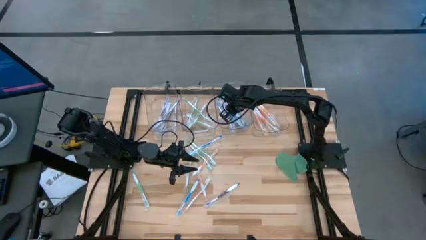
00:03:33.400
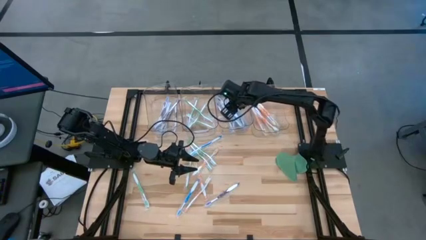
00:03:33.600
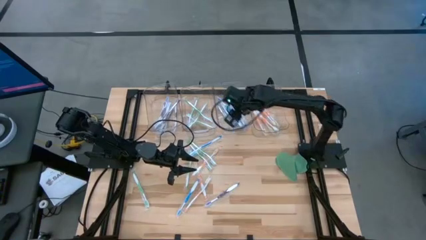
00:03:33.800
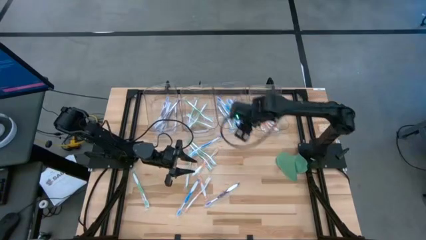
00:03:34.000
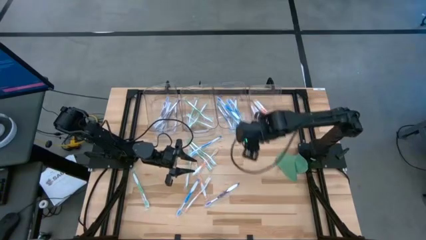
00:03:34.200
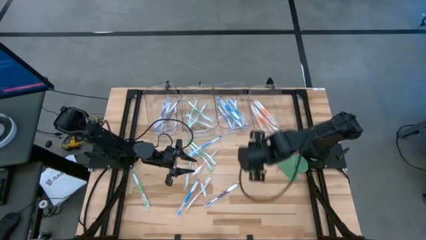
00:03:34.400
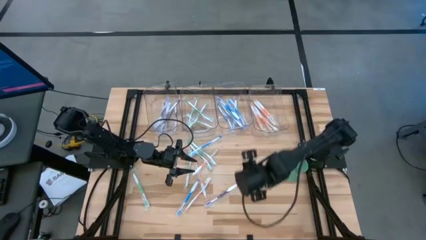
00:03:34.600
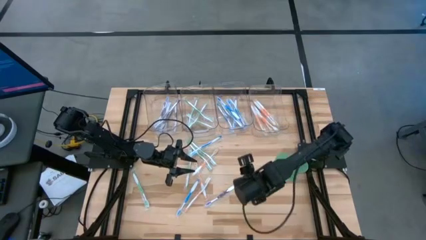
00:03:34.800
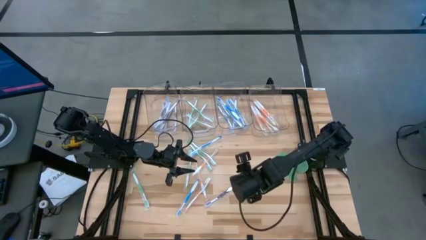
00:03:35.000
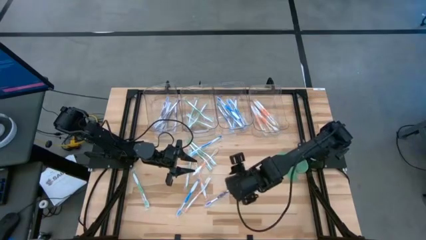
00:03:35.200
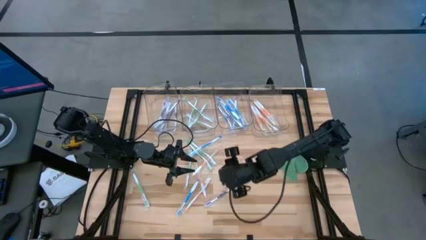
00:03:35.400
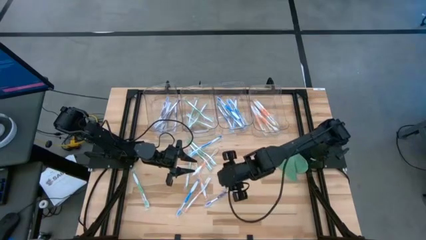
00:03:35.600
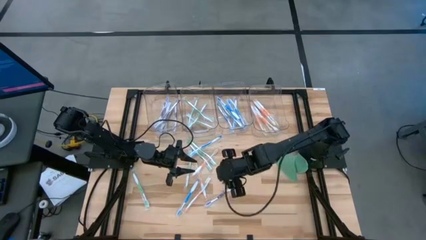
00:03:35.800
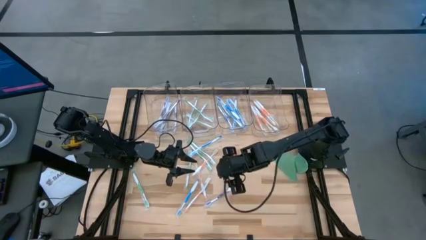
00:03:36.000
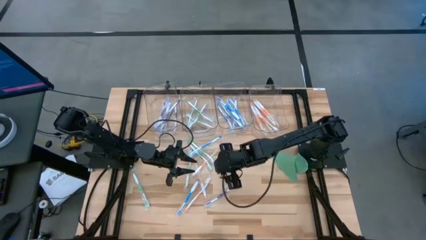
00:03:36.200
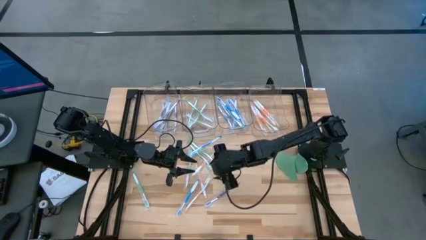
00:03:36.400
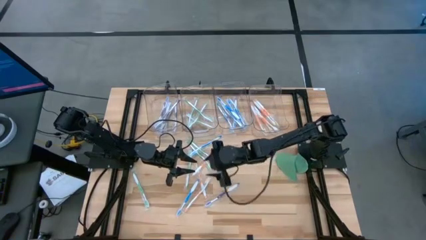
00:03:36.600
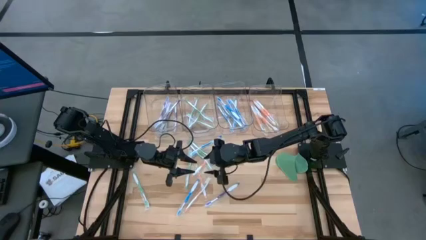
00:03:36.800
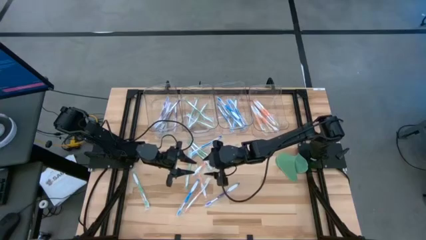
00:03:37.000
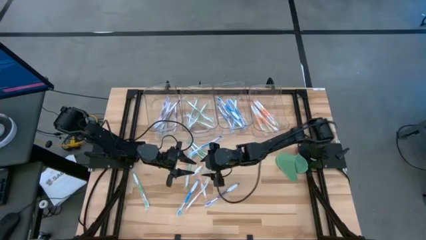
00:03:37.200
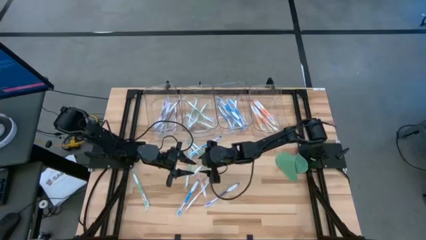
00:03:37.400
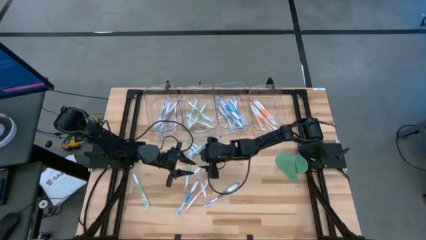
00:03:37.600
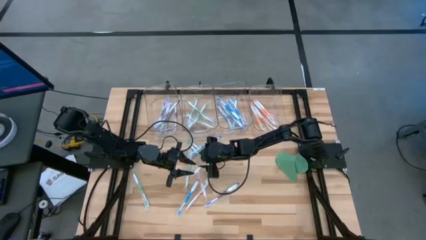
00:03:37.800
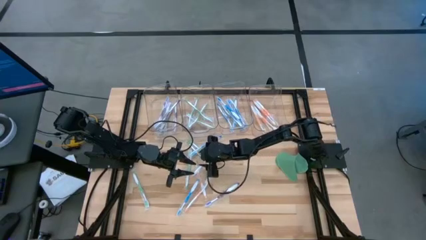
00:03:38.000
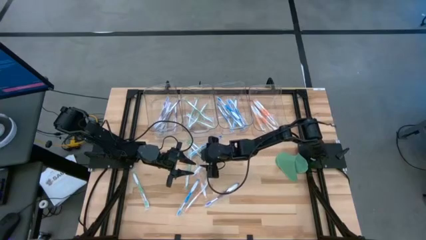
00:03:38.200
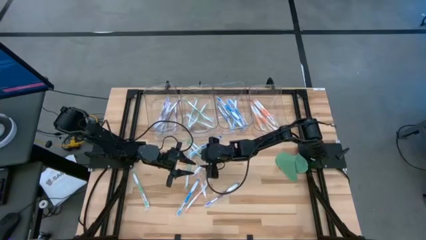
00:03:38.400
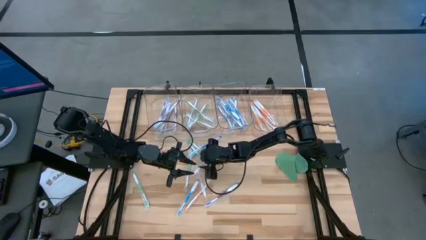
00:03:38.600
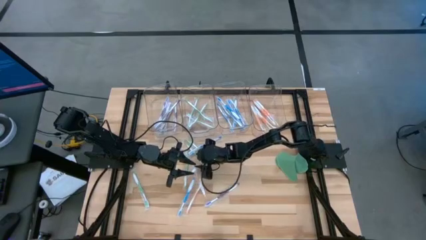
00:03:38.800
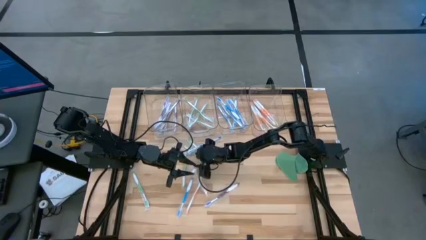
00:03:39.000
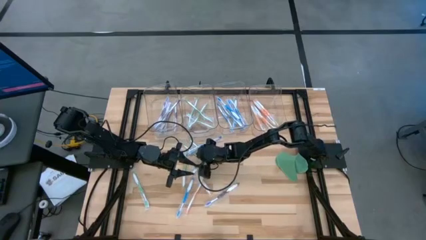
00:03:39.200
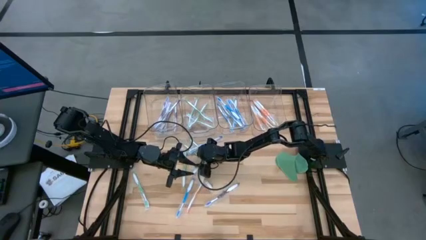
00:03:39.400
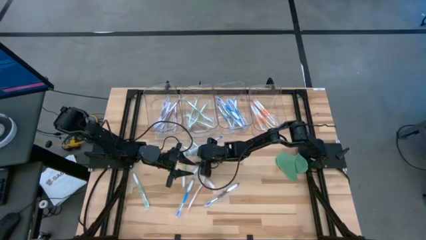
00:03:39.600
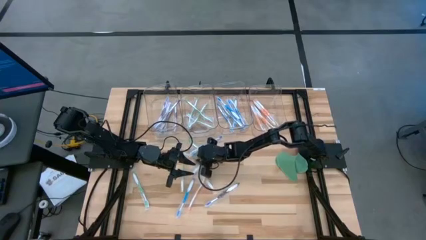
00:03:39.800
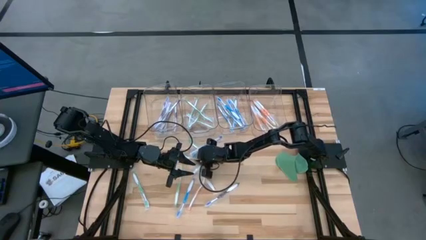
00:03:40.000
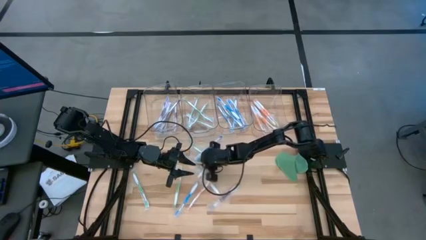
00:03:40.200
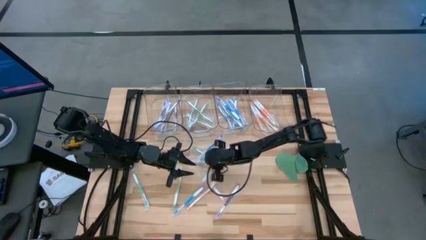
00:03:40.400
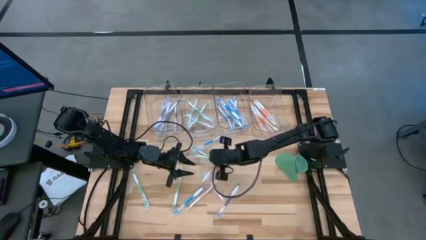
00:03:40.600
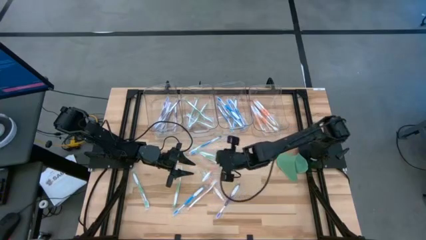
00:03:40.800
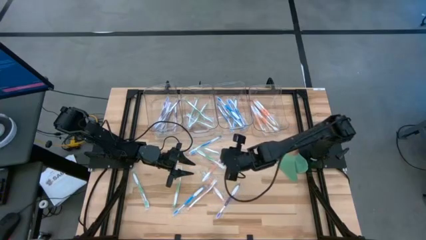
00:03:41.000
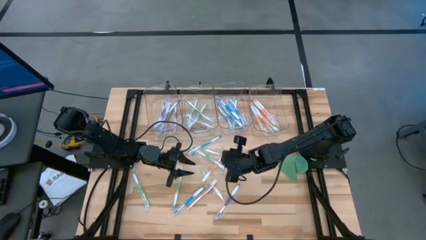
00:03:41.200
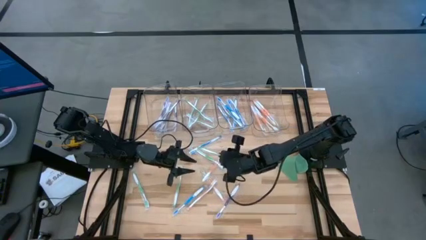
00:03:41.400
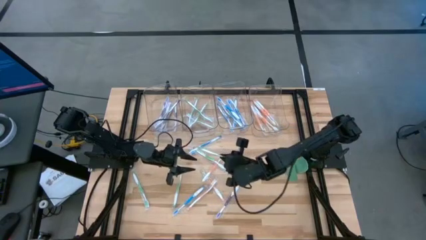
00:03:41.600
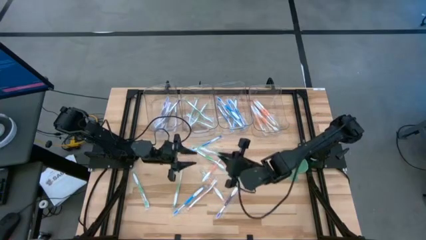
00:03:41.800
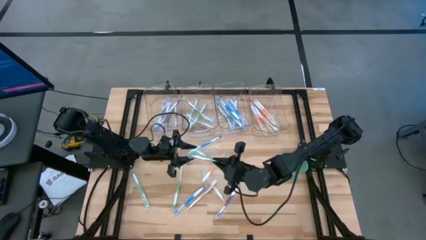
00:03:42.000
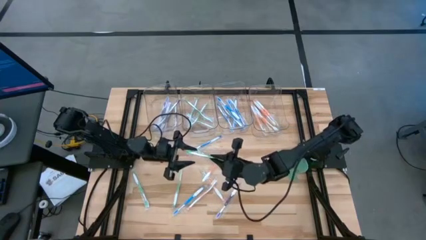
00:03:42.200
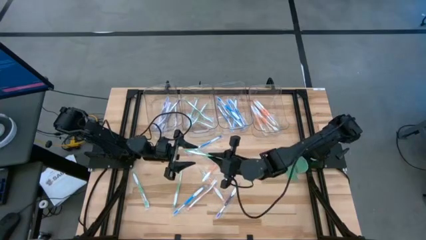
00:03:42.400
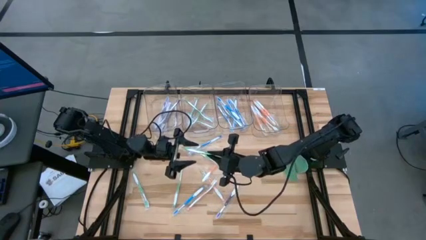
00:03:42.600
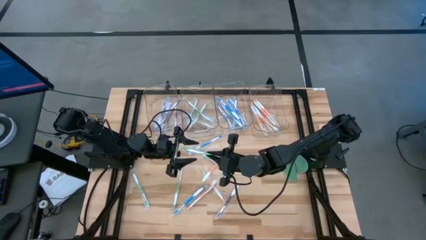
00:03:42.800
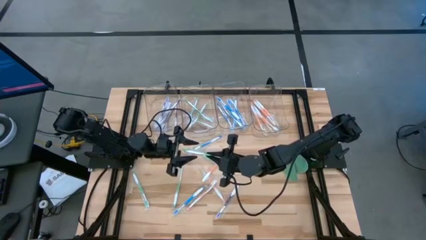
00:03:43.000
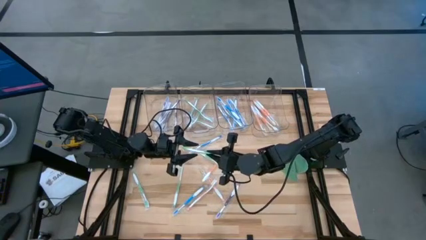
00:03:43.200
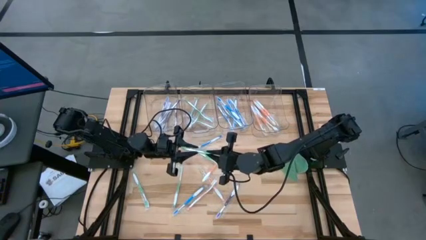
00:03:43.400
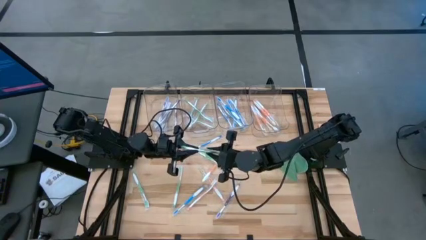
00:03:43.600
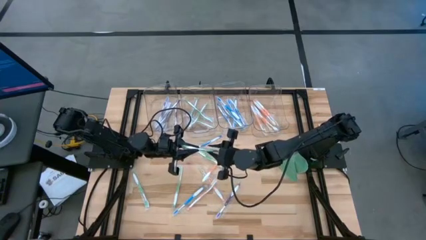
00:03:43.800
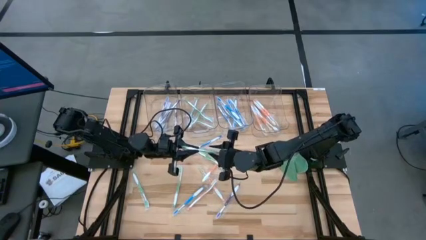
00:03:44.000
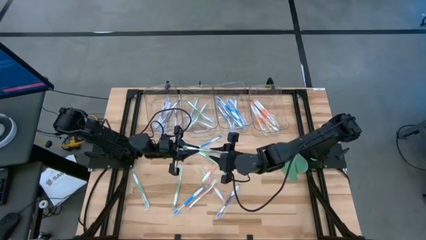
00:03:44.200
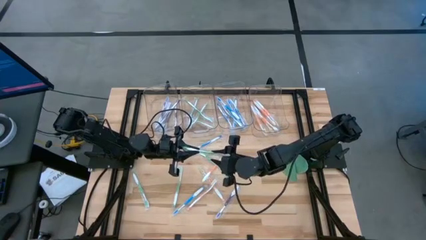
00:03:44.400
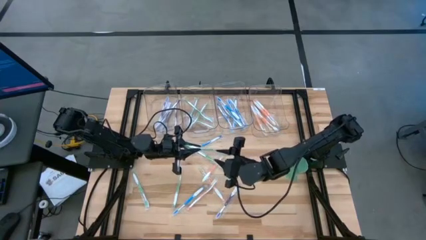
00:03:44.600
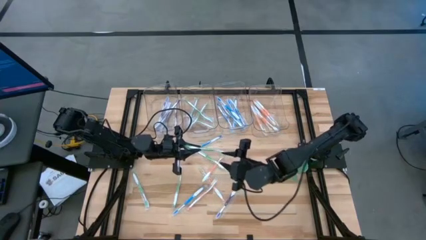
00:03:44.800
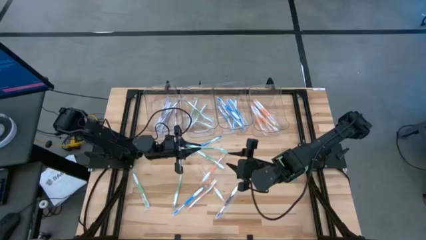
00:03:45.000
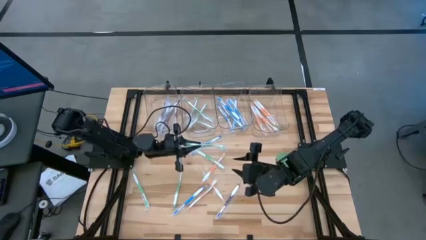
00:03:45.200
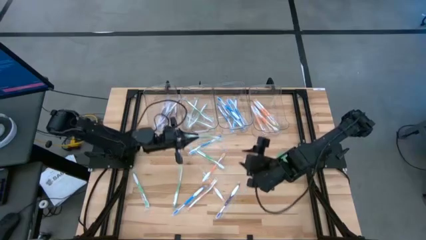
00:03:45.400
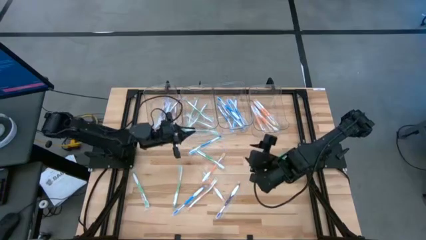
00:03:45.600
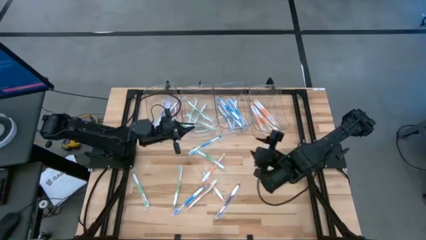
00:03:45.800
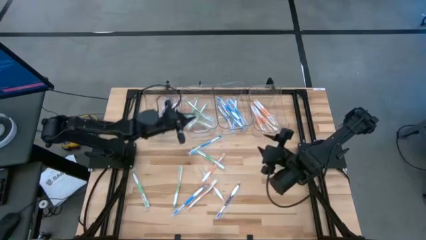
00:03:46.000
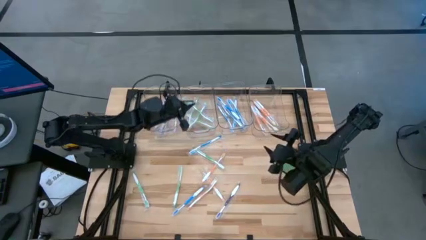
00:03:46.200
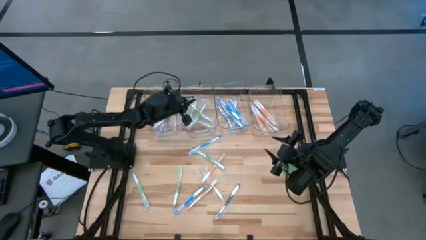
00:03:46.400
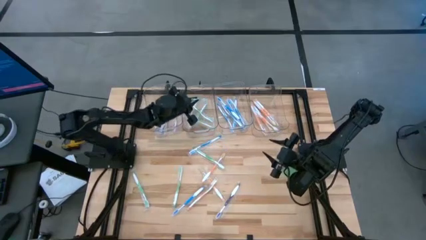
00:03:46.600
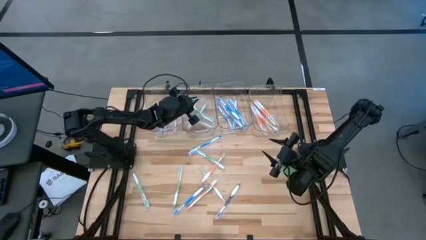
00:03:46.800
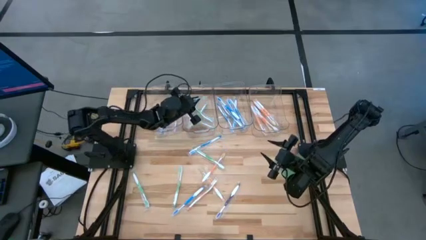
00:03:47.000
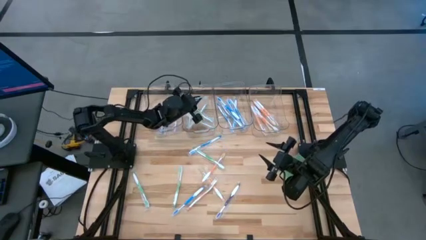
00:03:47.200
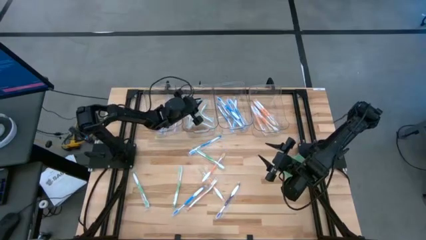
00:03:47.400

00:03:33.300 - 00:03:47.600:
Task: Pick & Place Toothbrushes
Put the green toothbrush into the middle left transparent bin

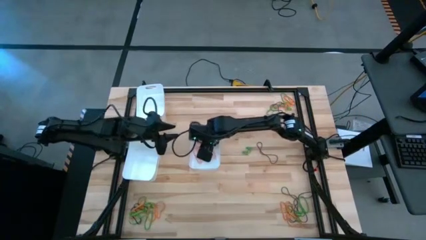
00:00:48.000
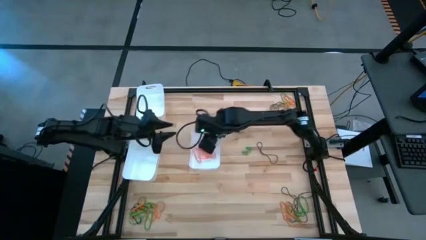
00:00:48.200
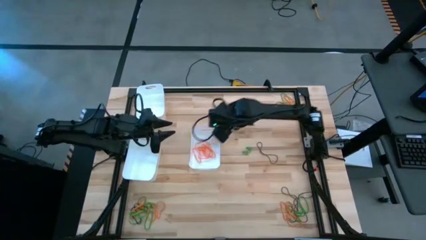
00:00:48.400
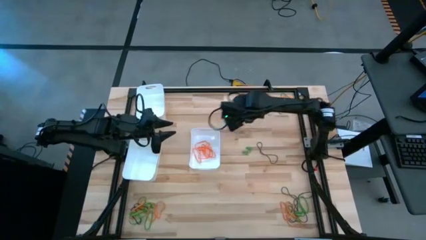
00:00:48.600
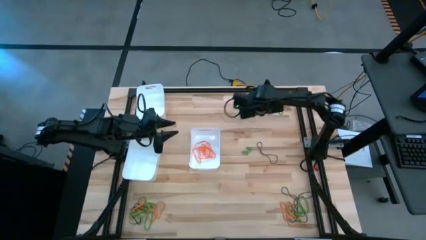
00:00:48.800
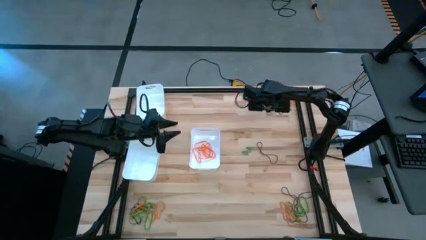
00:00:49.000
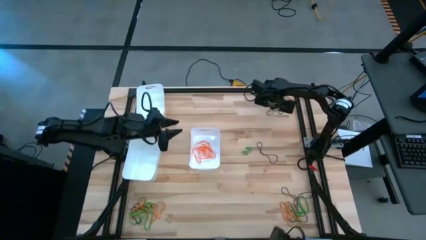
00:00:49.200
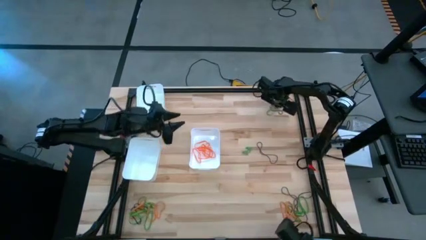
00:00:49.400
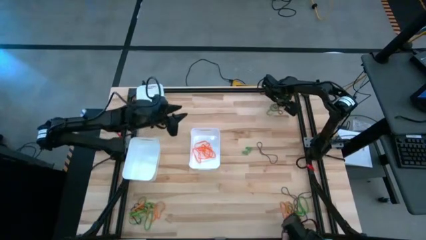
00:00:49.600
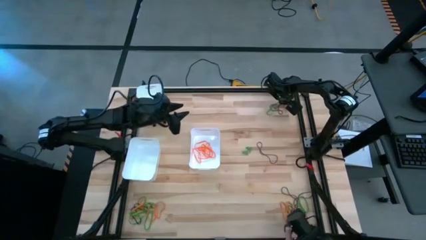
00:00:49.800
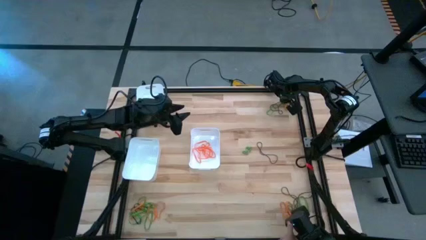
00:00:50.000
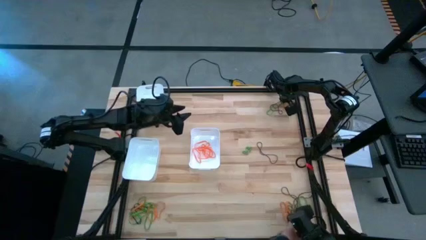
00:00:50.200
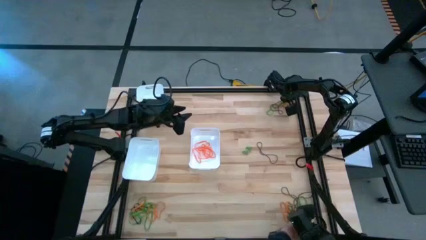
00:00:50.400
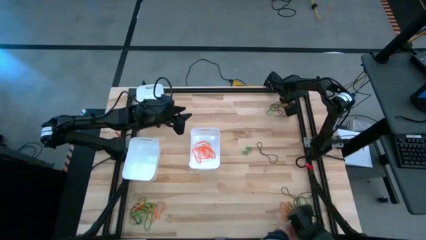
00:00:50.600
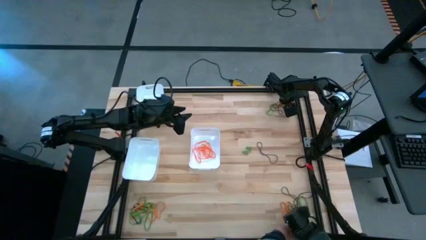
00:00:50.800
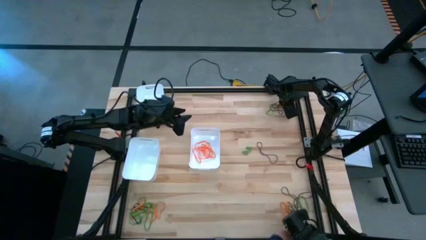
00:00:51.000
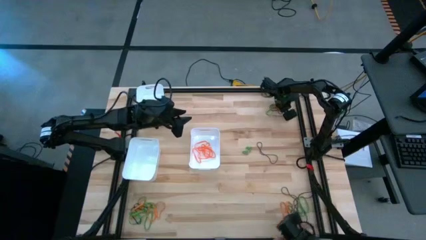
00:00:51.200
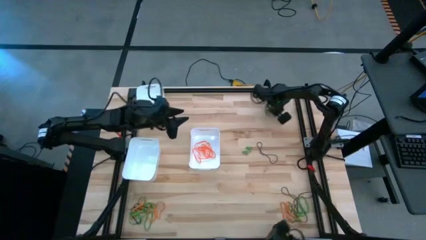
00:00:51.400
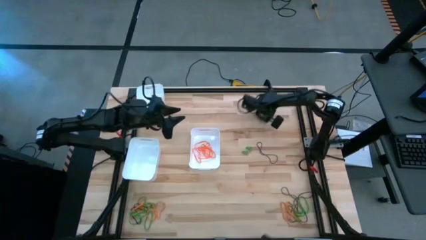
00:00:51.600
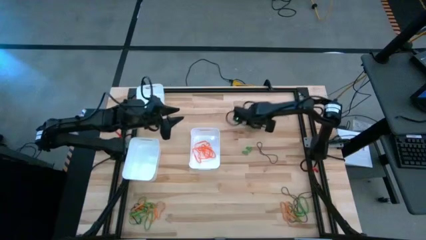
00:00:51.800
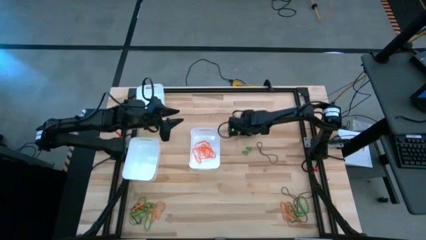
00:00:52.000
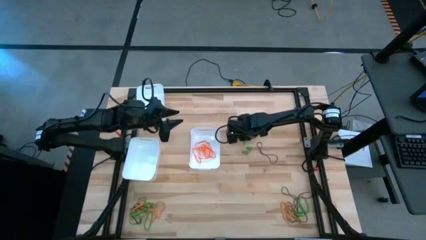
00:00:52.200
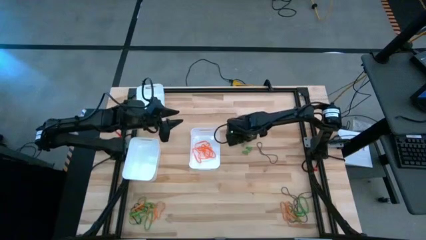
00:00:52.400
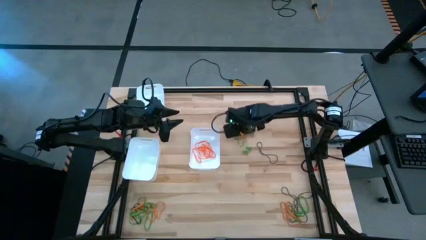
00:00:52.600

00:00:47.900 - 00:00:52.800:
Task: Sort rubber bands into baskets
Move the rubber bands from top right to bottom right white bin
